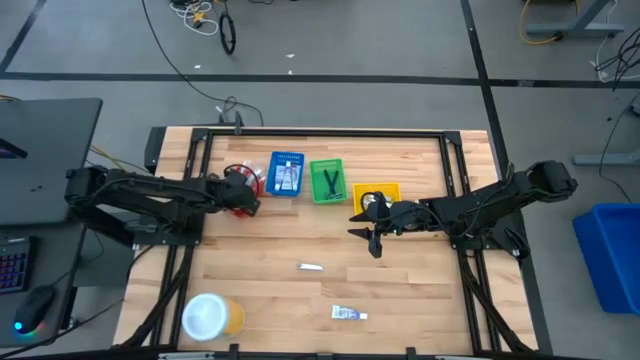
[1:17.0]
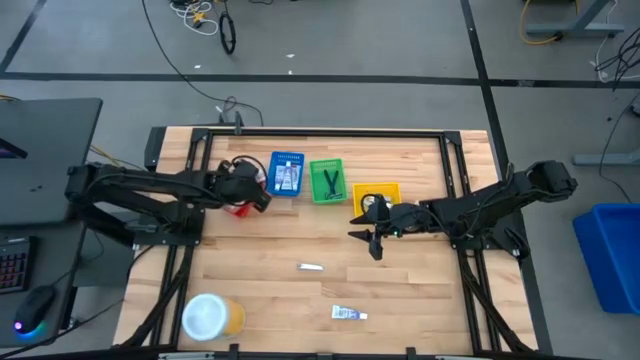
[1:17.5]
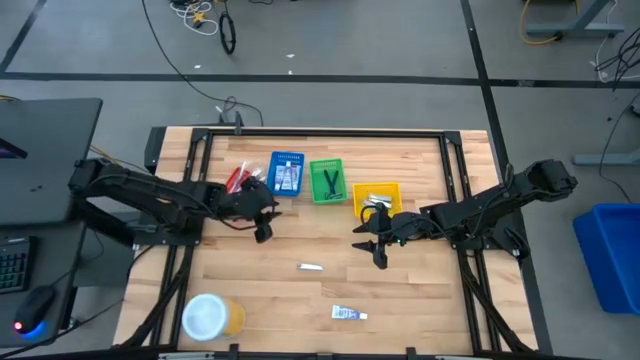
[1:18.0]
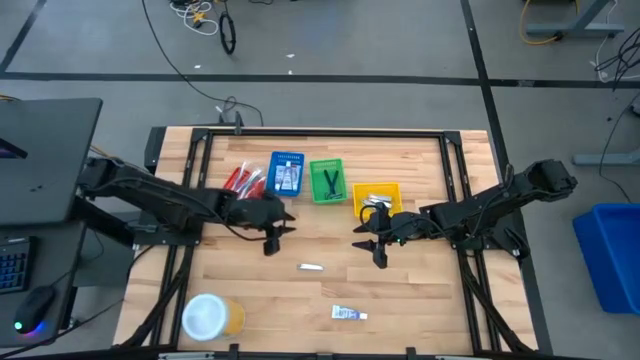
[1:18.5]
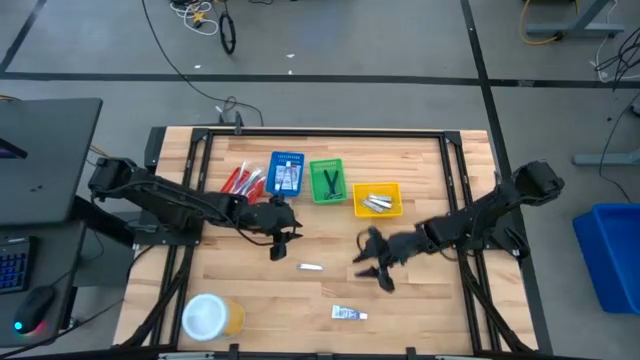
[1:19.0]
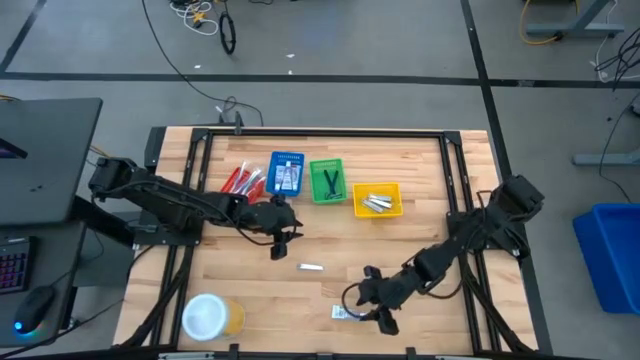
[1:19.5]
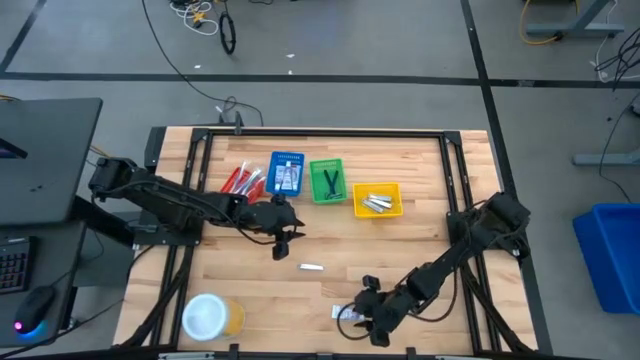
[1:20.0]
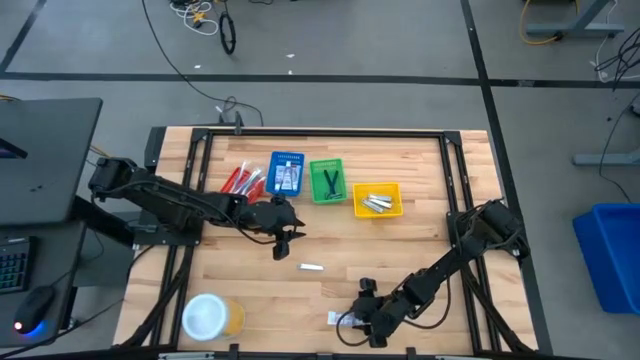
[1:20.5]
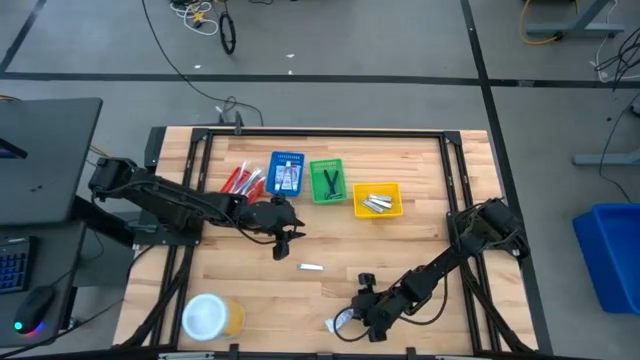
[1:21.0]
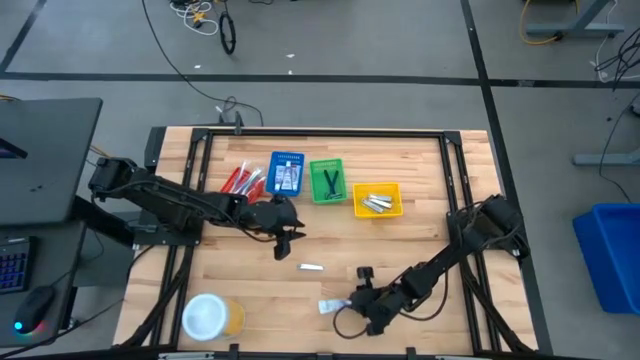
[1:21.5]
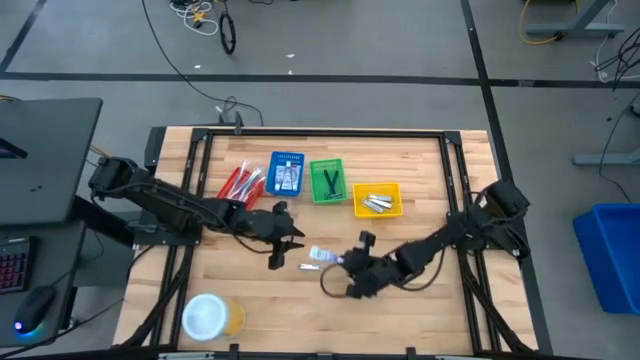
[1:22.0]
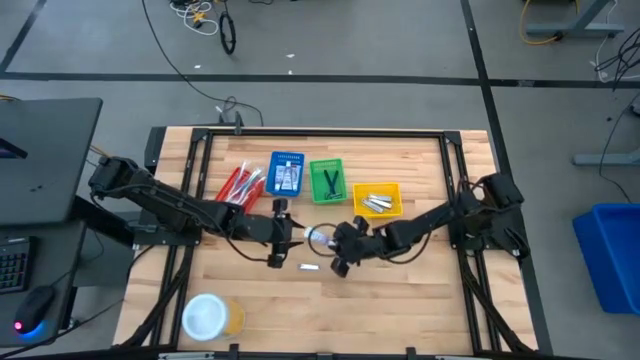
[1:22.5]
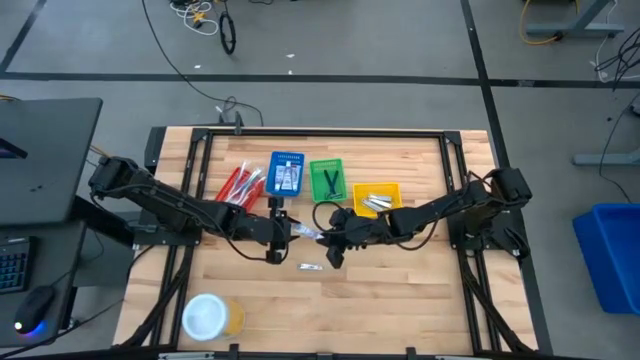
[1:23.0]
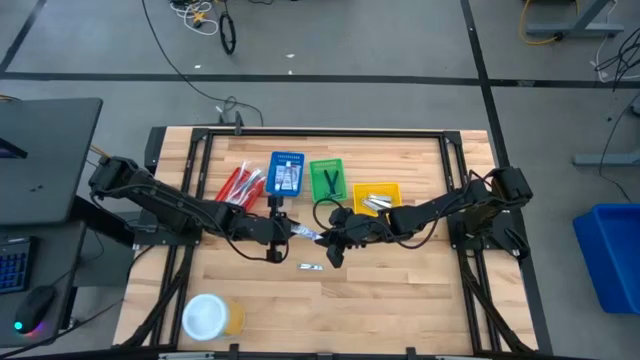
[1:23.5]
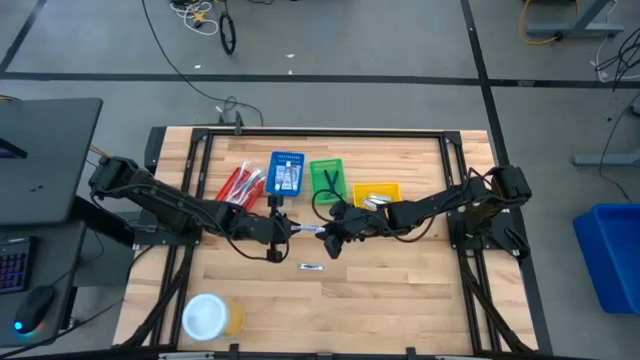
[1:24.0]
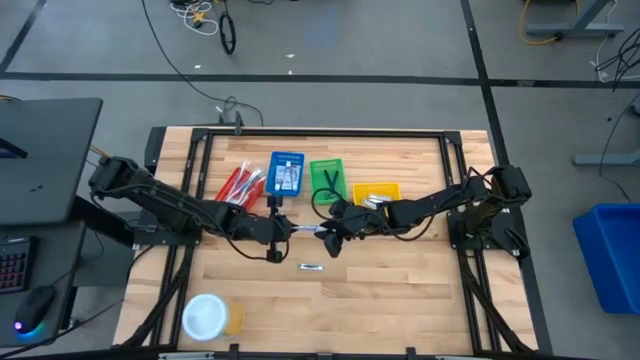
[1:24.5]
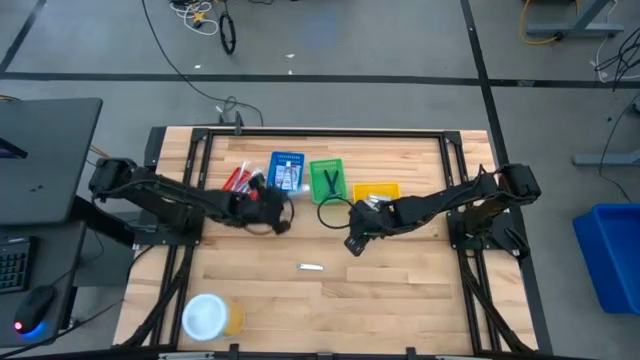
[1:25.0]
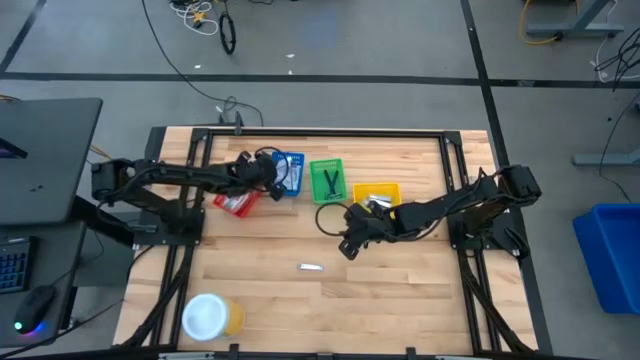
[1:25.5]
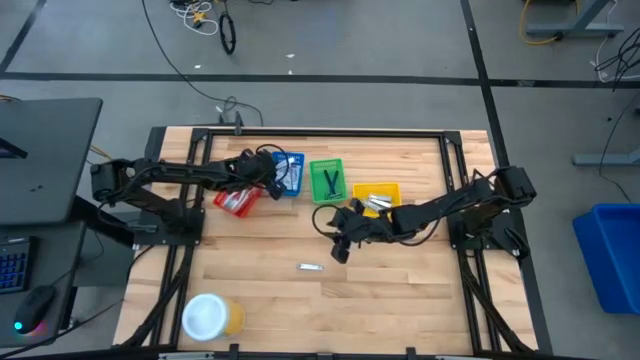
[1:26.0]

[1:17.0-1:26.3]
Task: Pick & Place Travel size toiletries
Put the white toothpaste into the blue bin

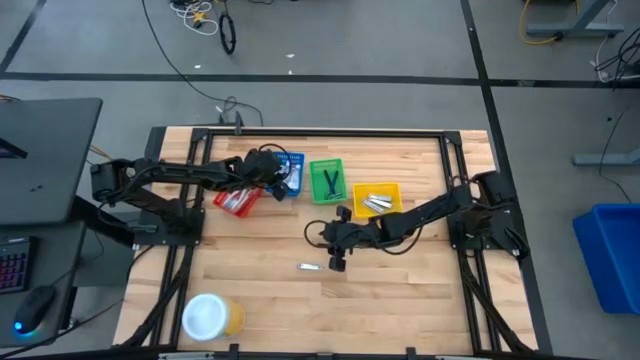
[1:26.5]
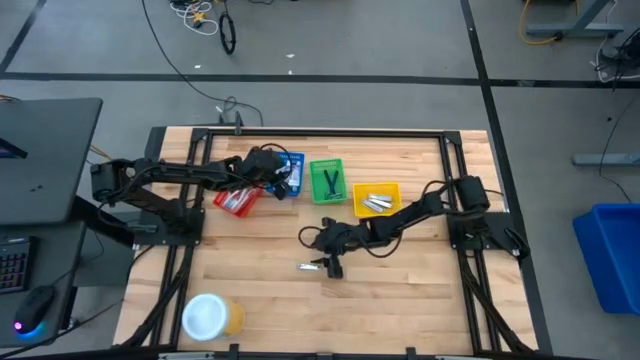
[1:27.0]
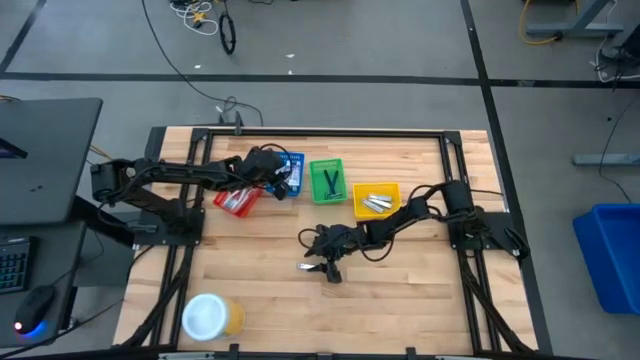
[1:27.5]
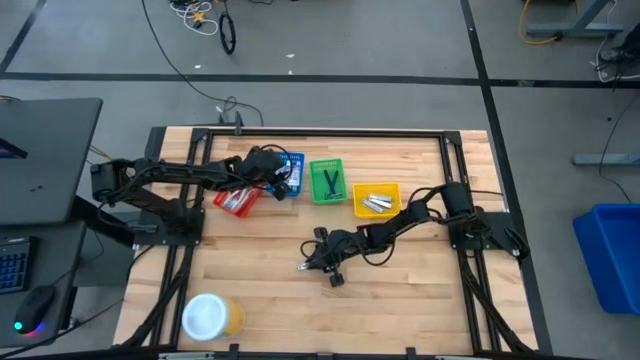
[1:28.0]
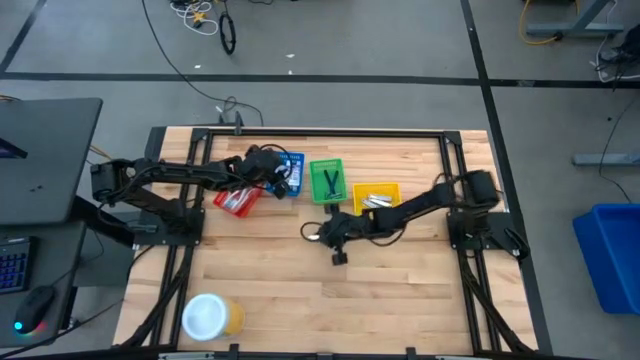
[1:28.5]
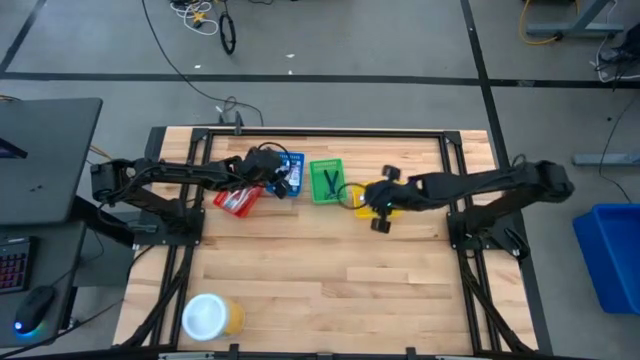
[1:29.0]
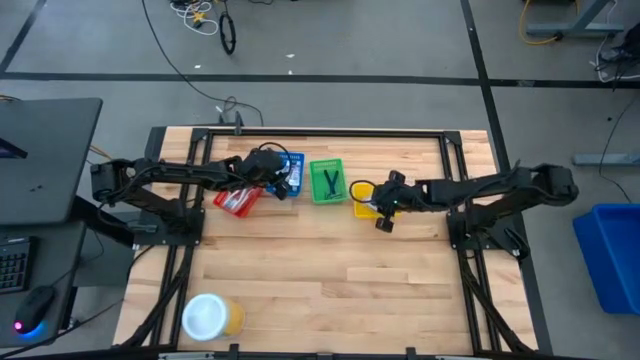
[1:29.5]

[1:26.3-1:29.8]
Put the silver nail cutter into the yellow bin

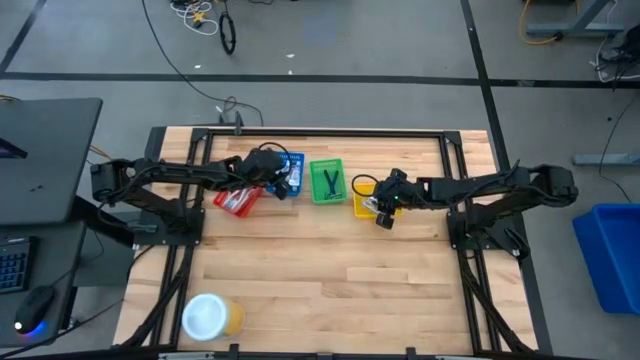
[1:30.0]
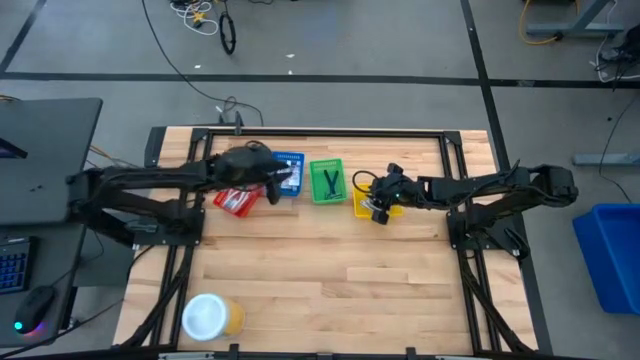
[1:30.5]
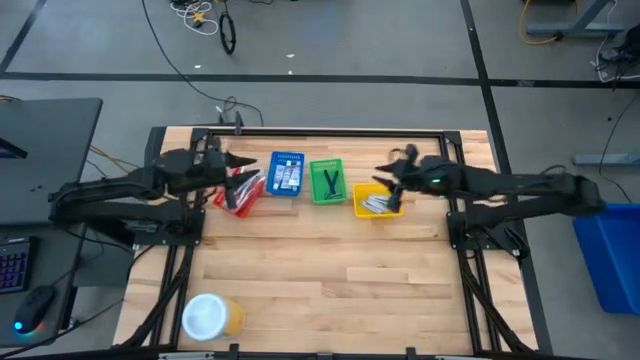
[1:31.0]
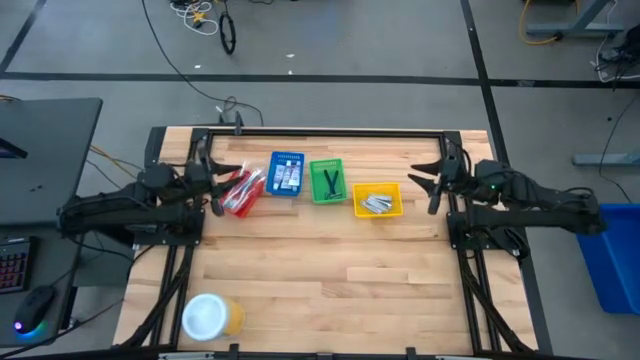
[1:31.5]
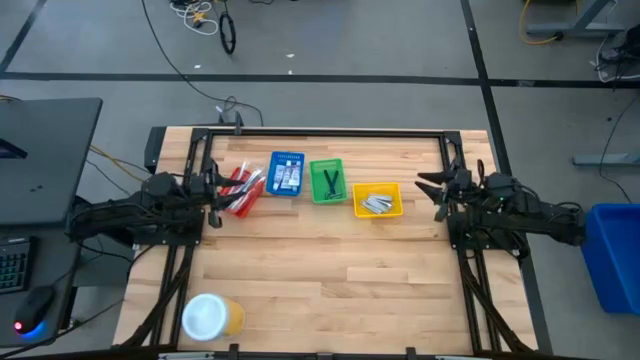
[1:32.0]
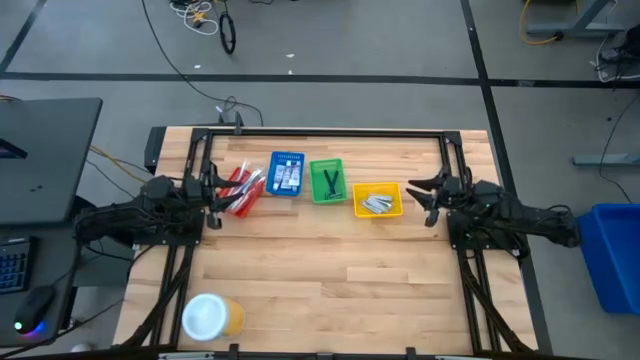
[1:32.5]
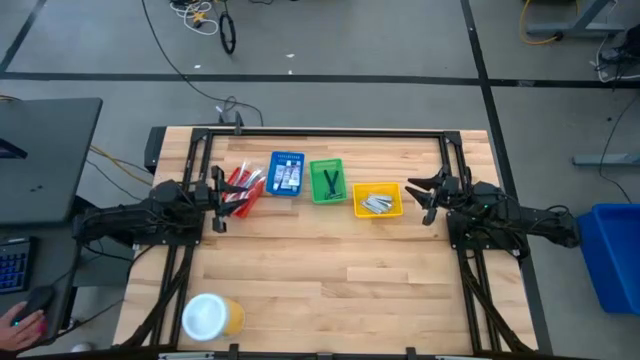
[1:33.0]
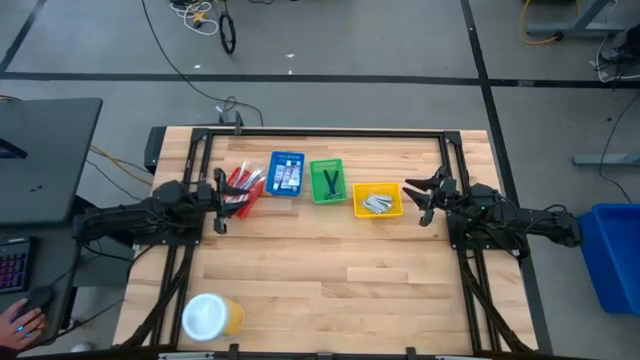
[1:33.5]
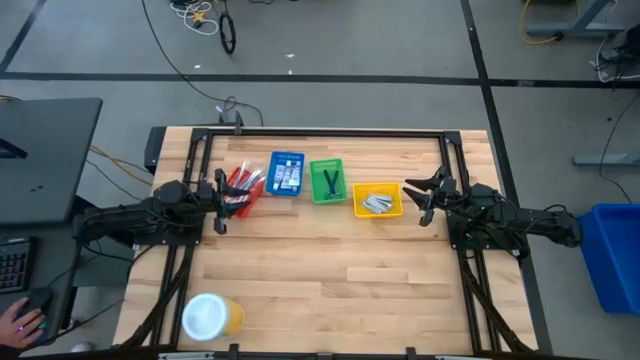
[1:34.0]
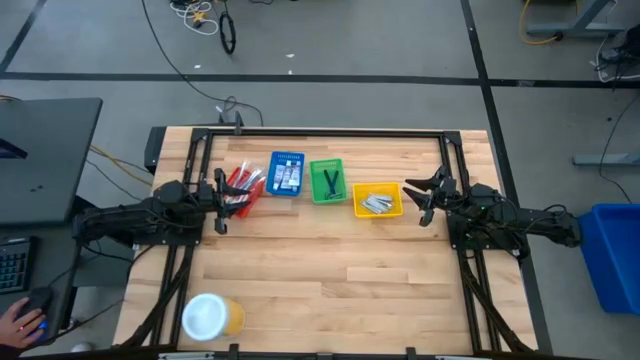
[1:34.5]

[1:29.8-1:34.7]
Return to Home Position

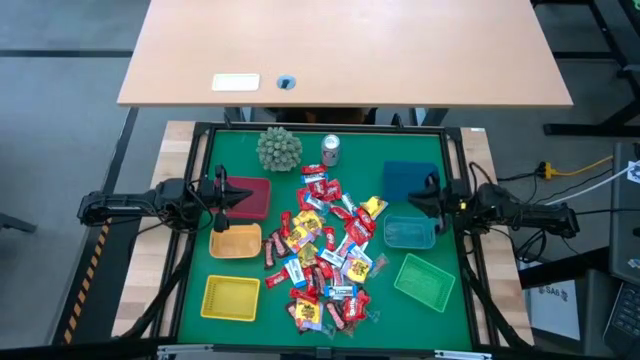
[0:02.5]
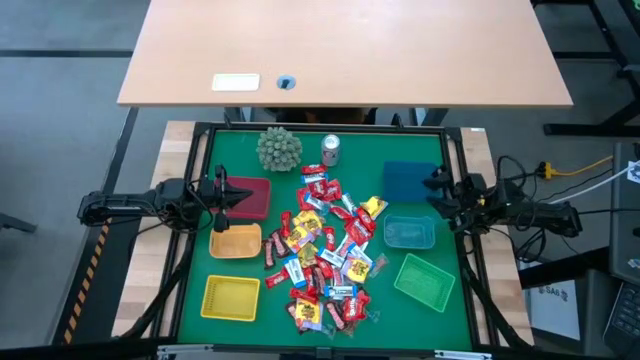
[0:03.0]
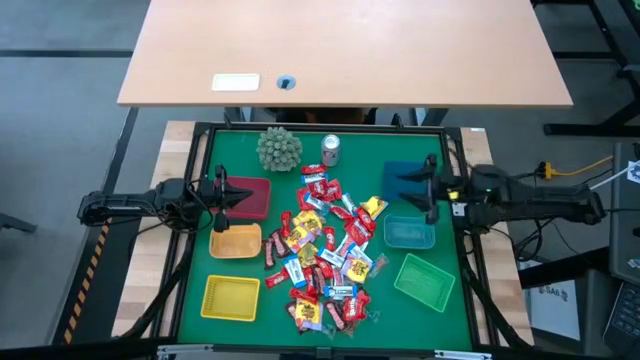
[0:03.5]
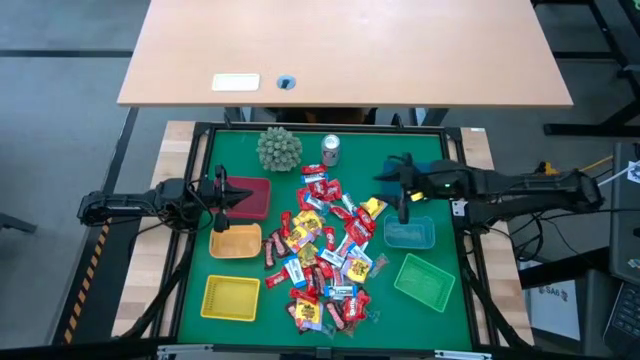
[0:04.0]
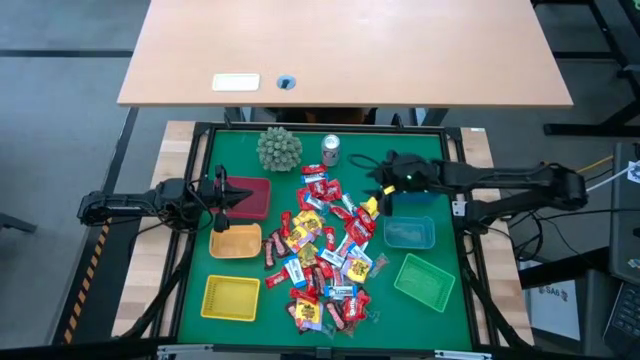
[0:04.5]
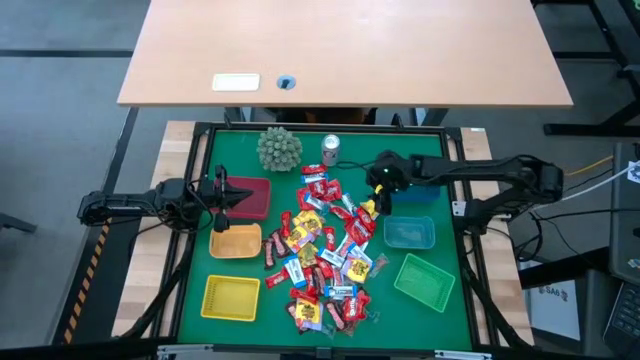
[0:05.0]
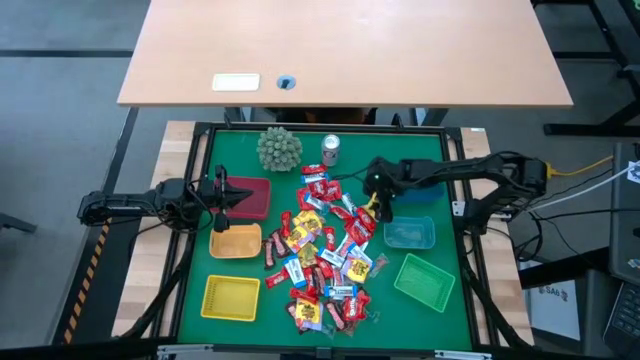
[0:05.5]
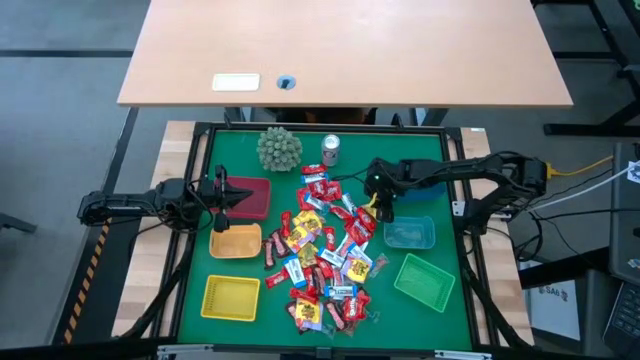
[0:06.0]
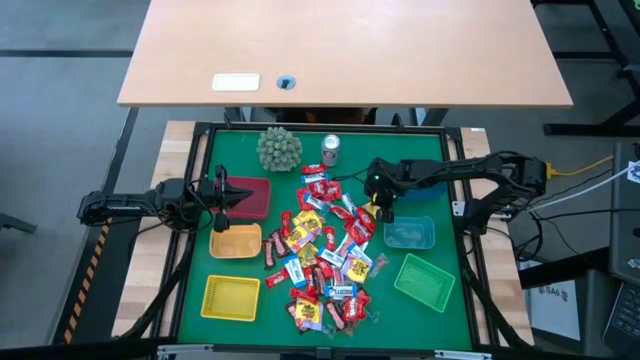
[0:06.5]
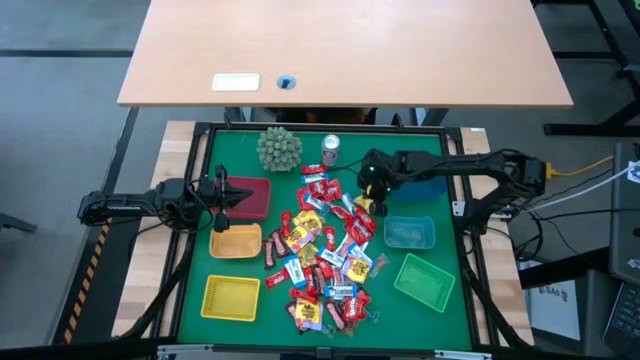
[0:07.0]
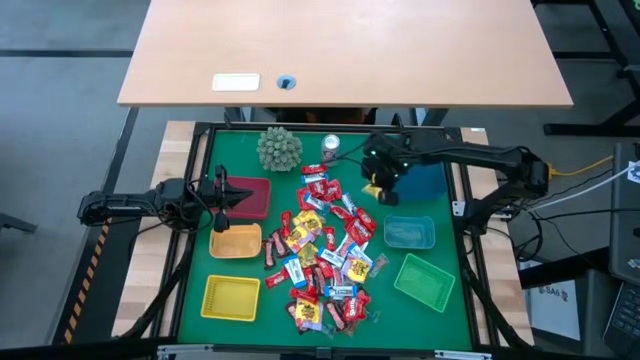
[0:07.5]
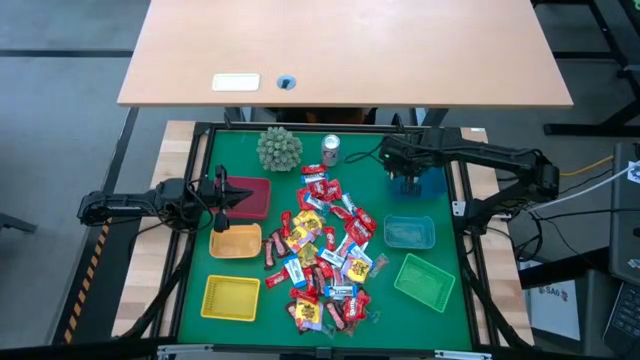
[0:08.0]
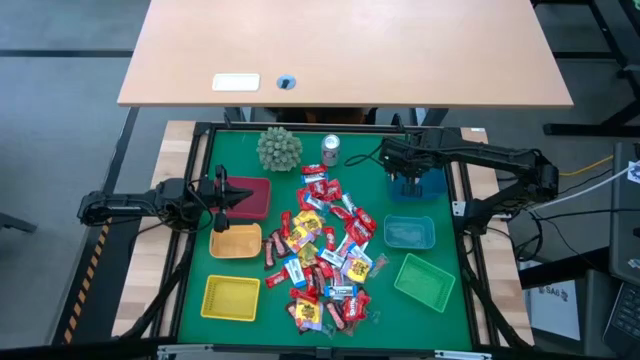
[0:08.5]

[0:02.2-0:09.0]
Task: Sort candy
Put the yellow candy into the dark blue bin
